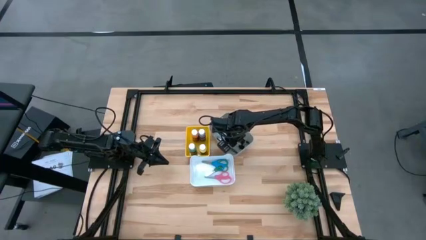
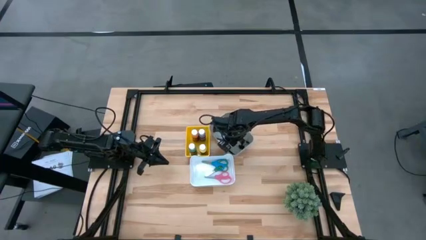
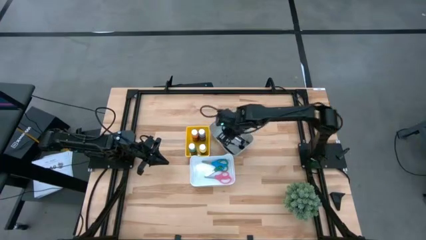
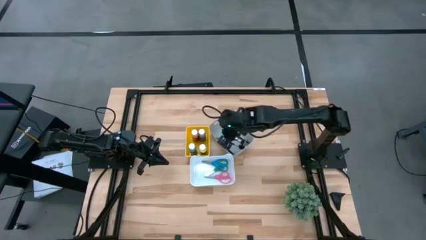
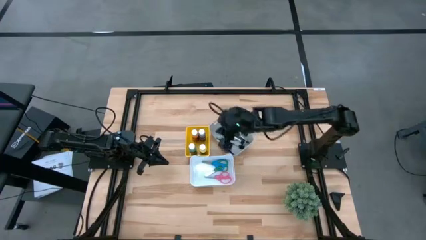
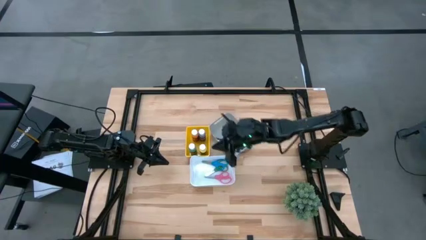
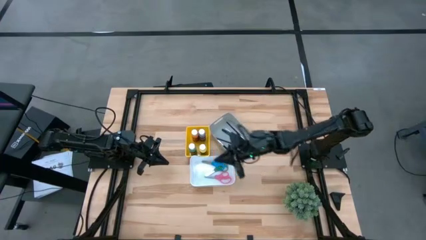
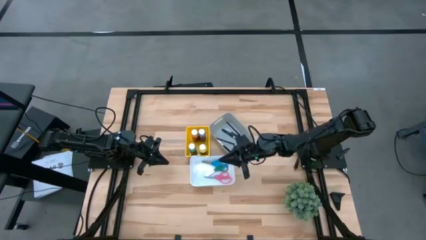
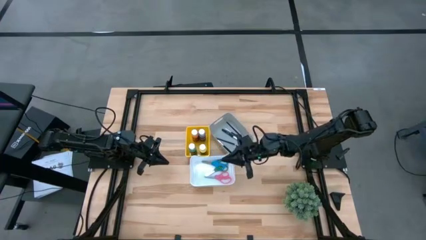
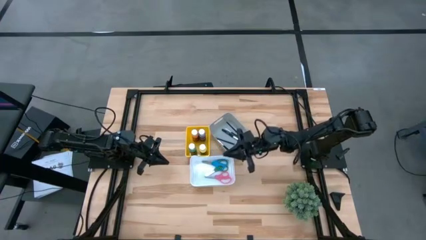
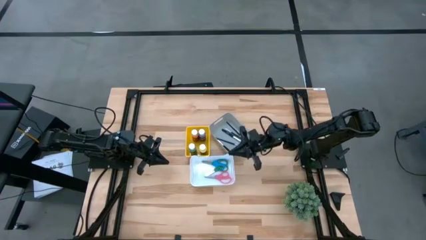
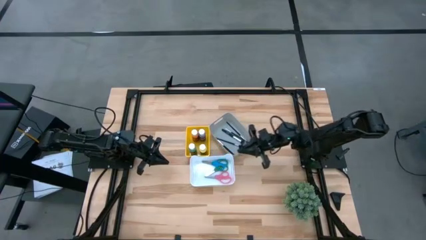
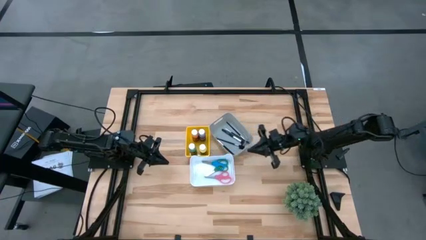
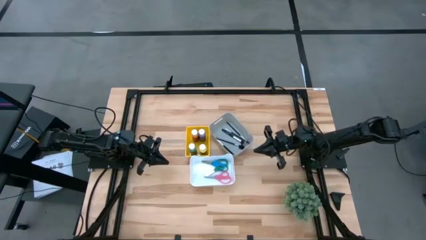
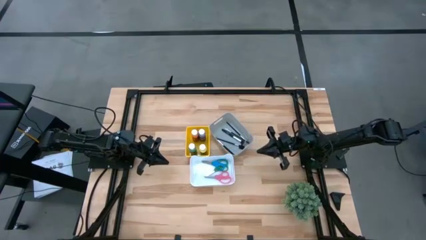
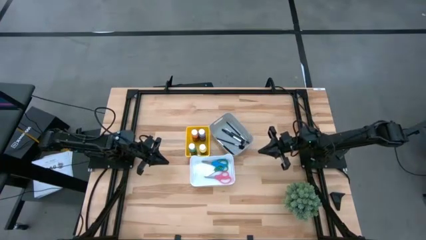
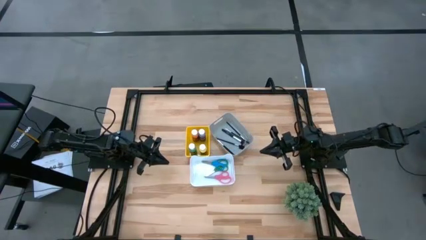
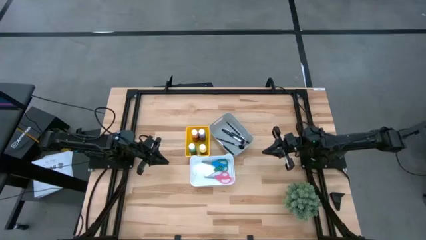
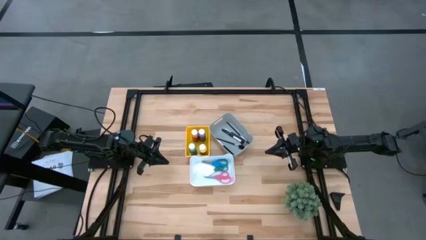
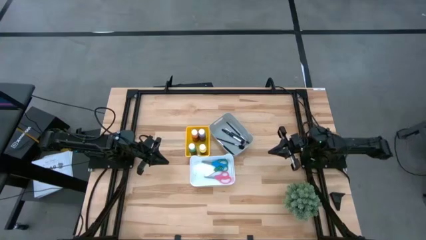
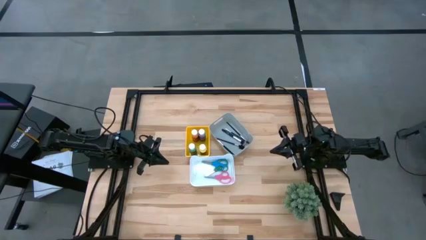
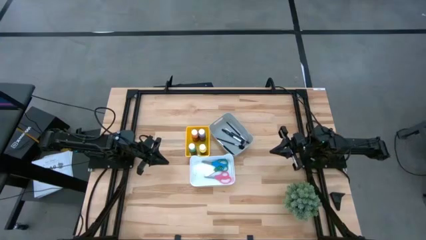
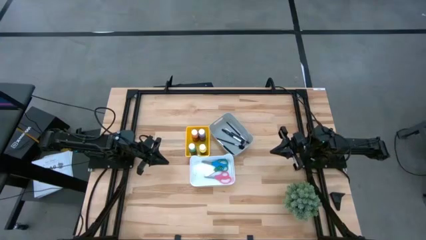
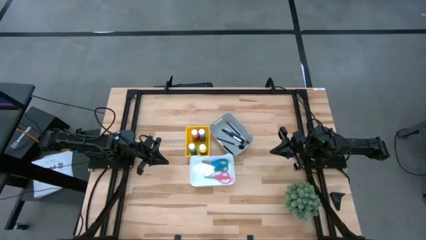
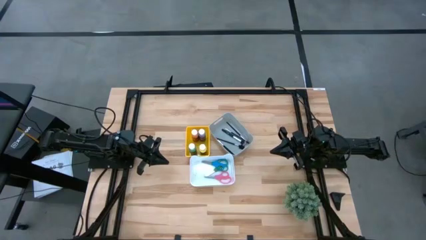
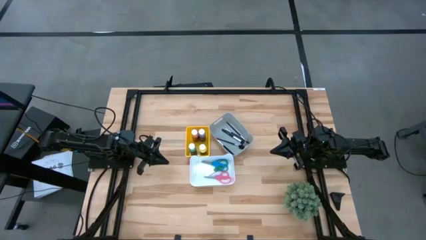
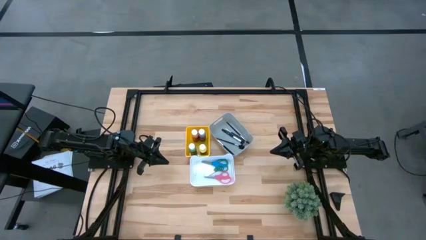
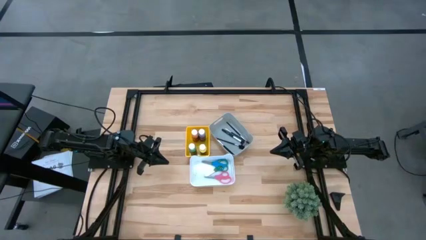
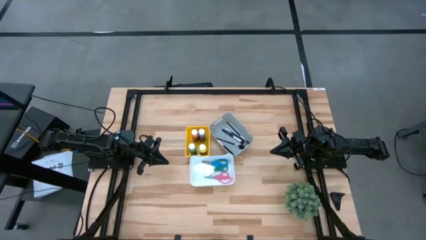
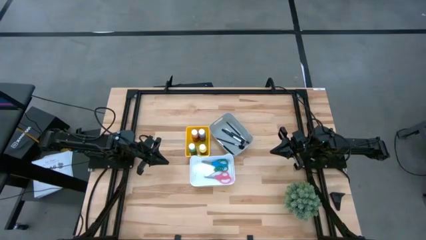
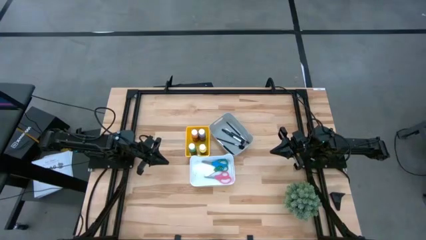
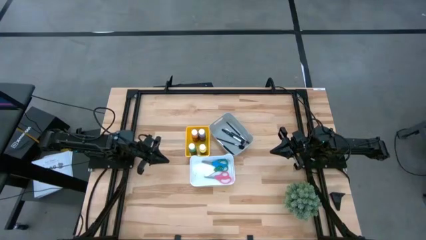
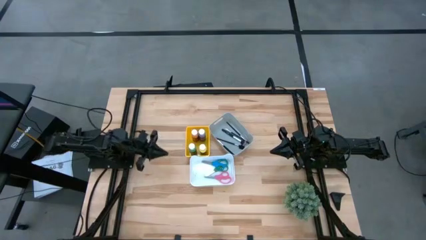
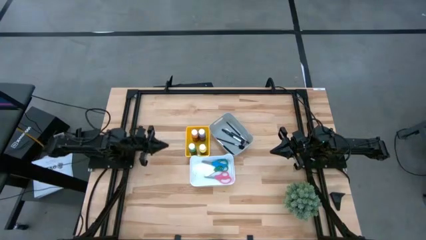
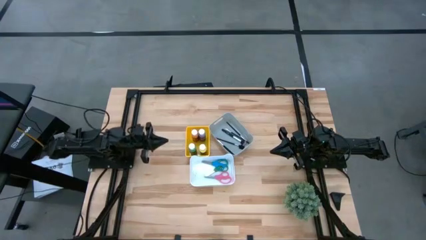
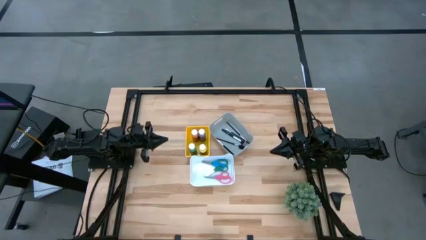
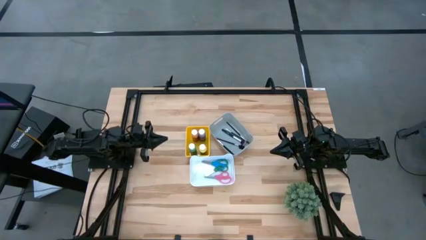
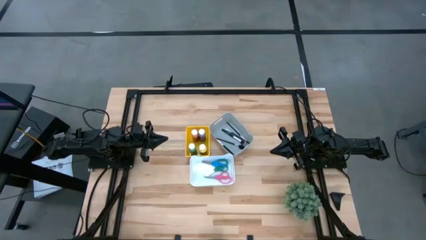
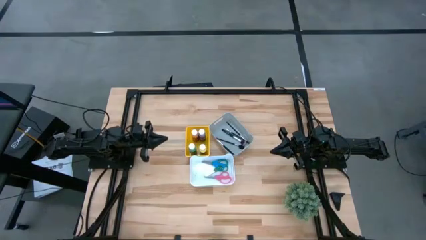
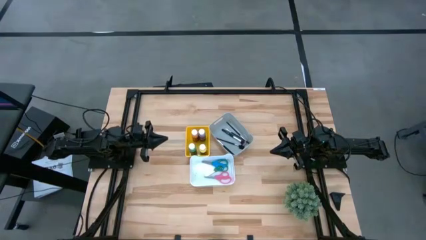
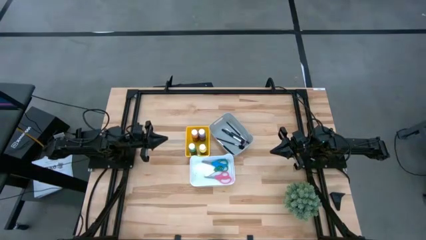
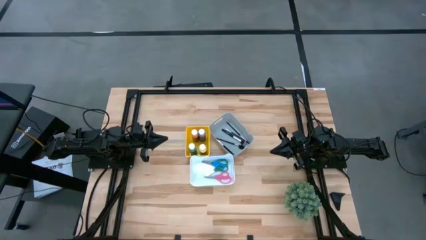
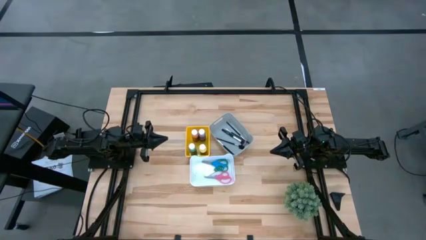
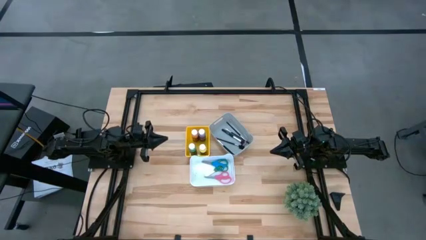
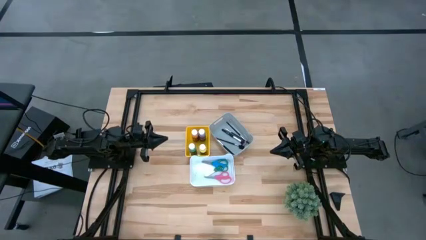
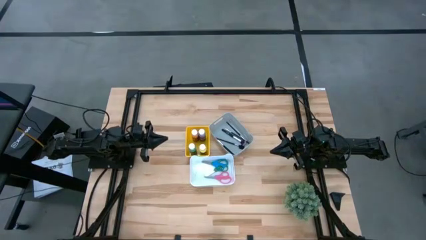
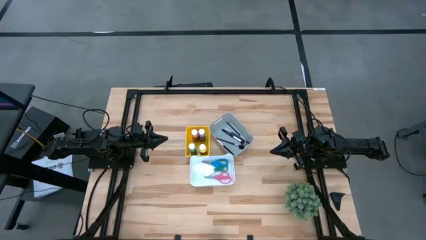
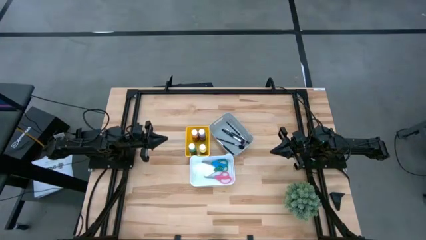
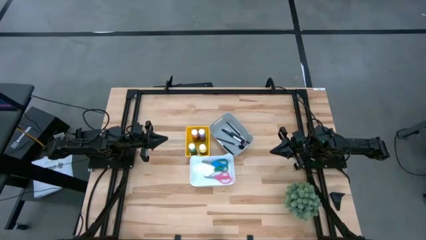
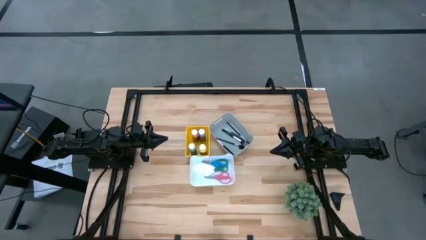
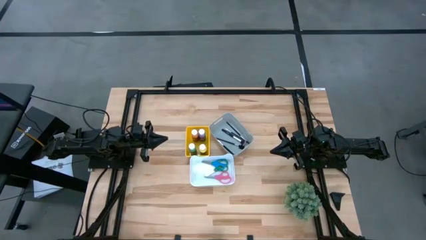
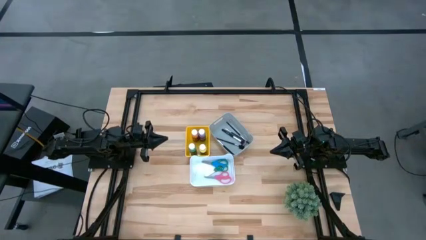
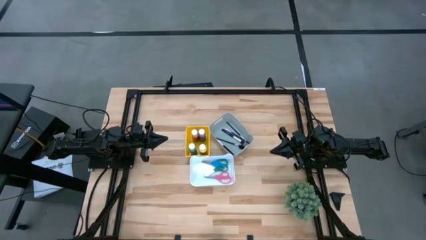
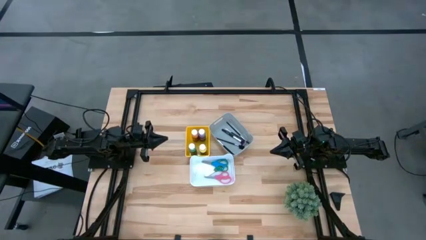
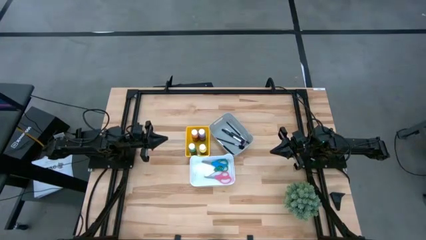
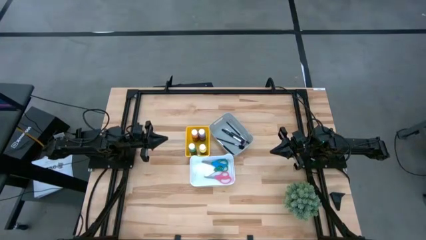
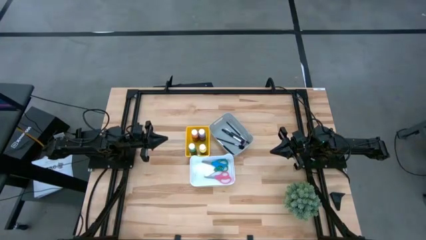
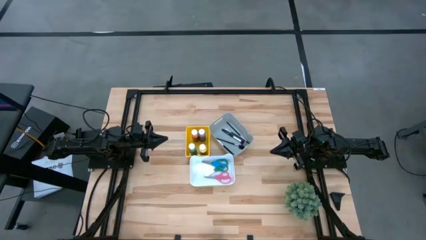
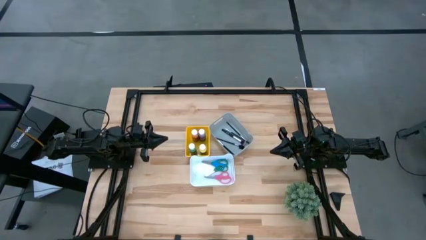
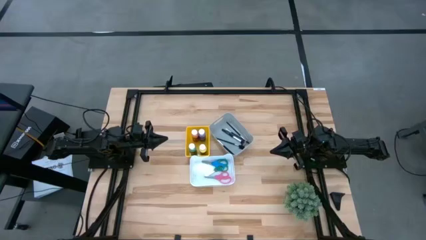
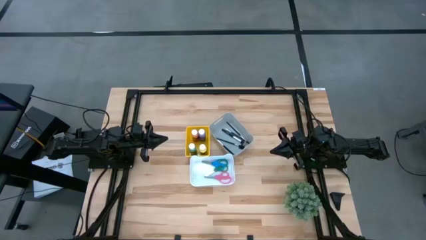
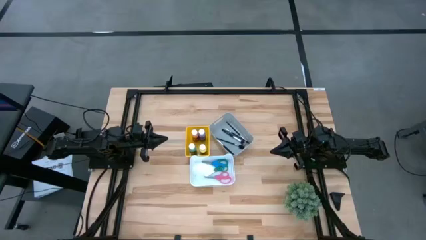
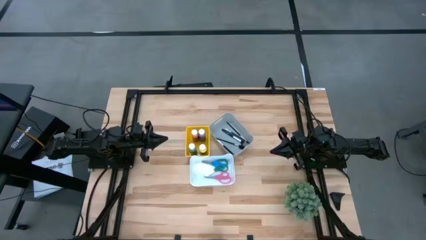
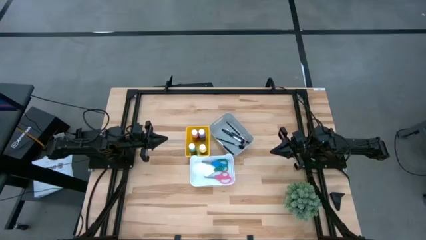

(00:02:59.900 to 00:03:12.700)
Task: Pick & Place Paint Supplies
Return to Home Position

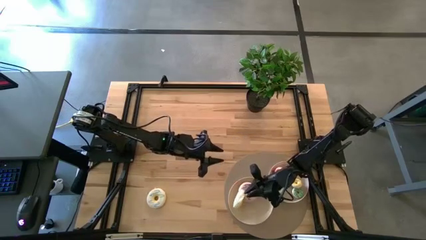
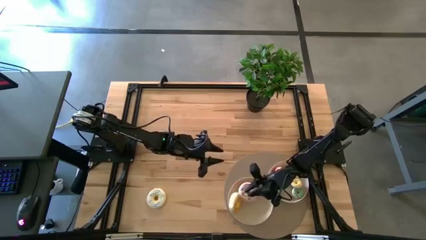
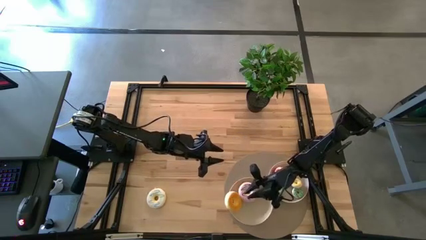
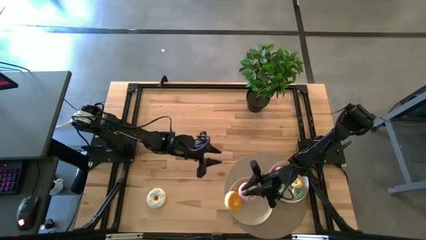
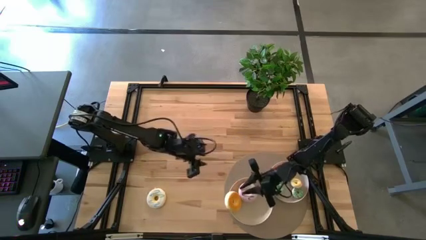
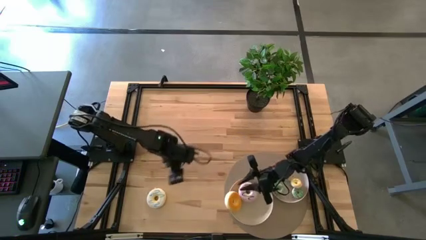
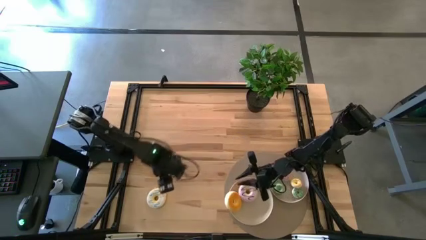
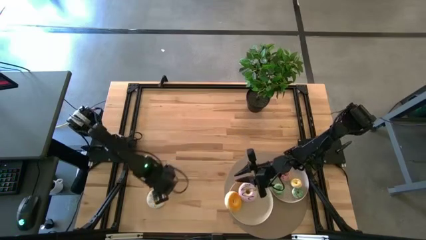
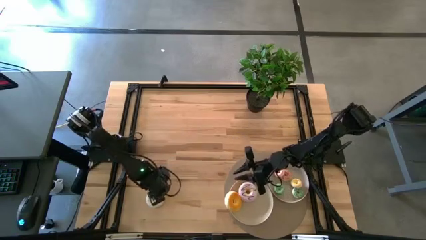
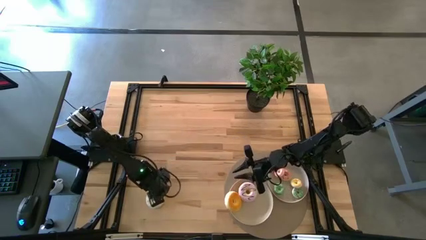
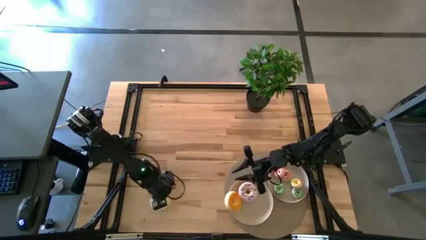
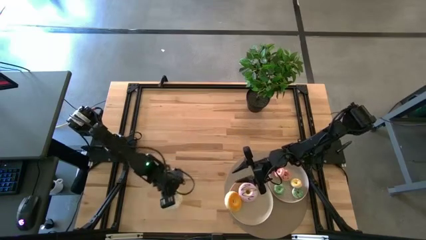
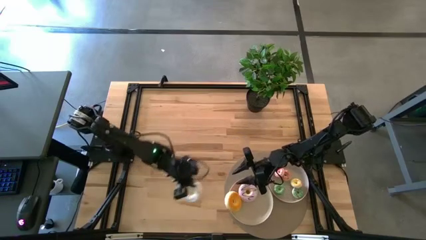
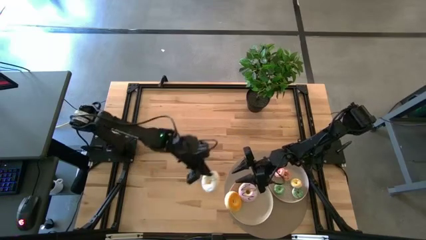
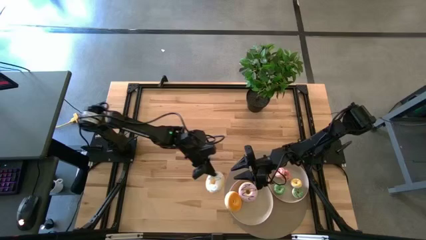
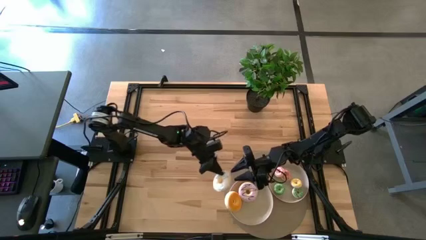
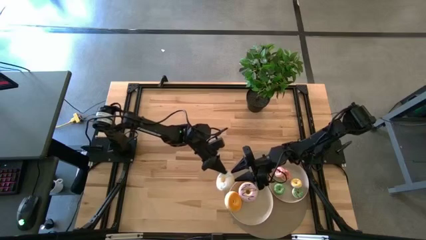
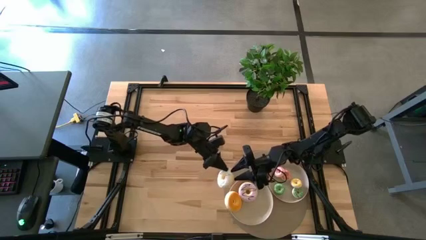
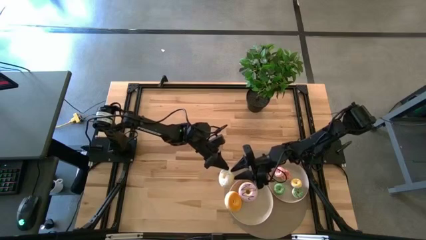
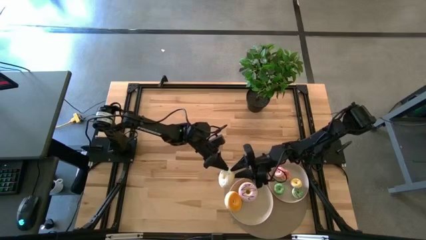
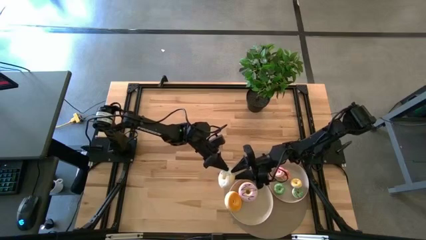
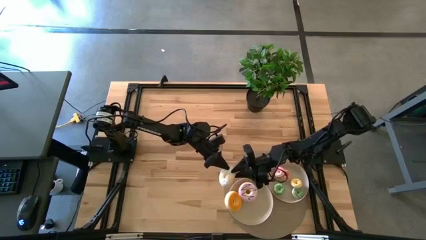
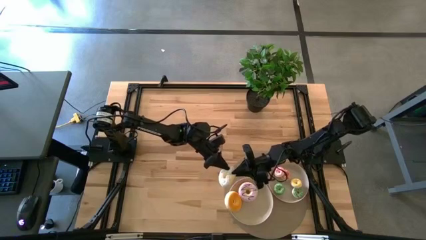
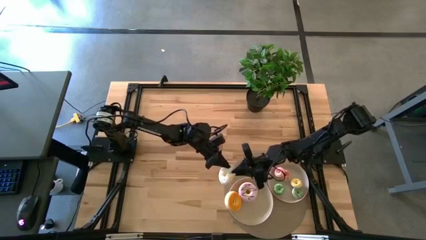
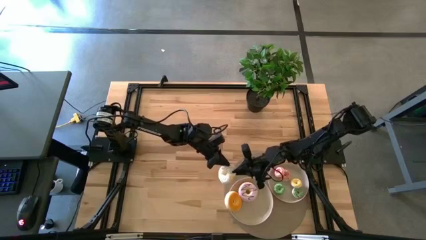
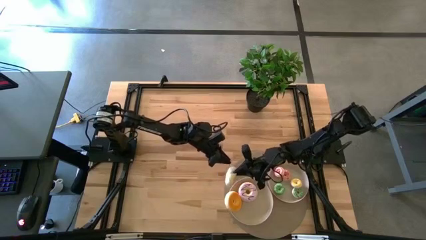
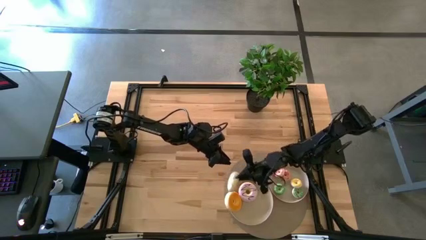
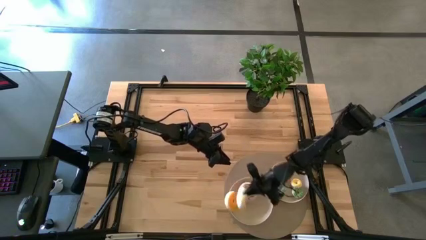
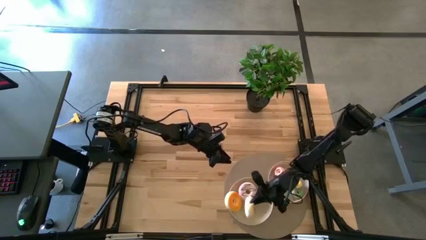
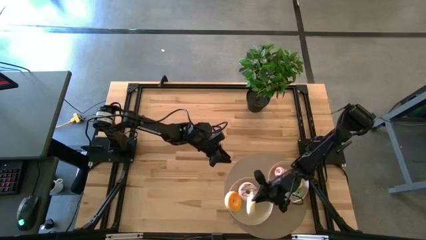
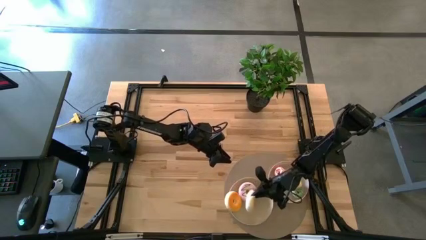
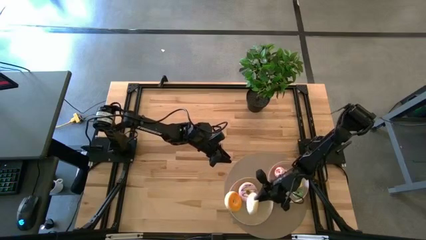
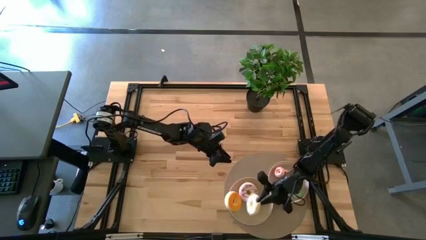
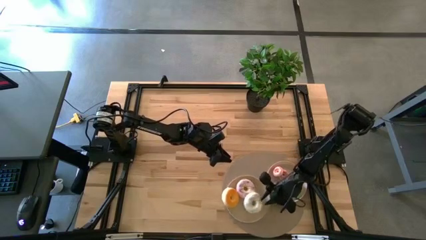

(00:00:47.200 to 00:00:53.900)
Task: Pick & Place donuts
Put the big white donut into the left white plate
